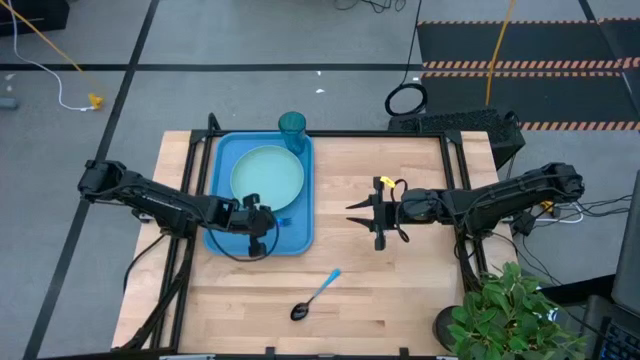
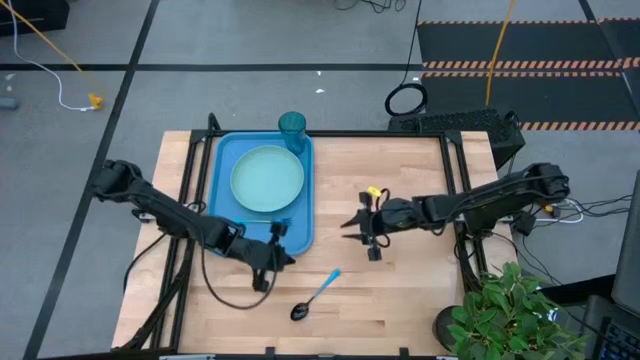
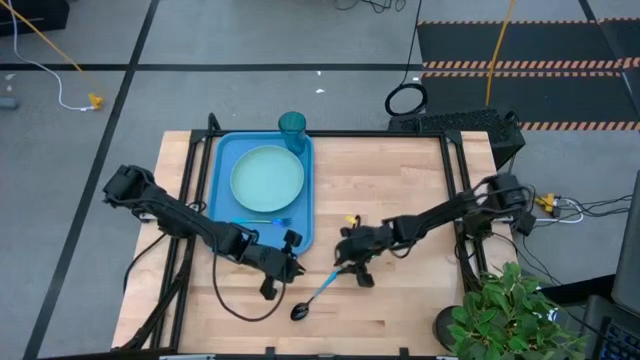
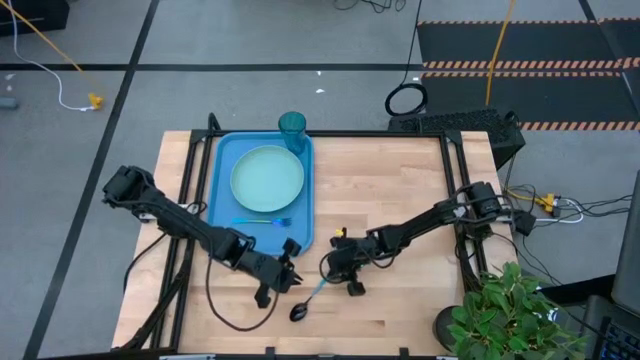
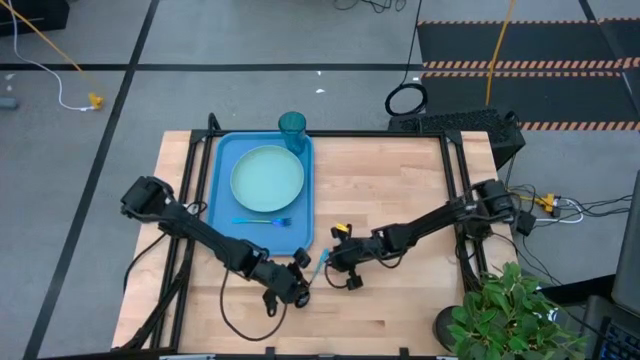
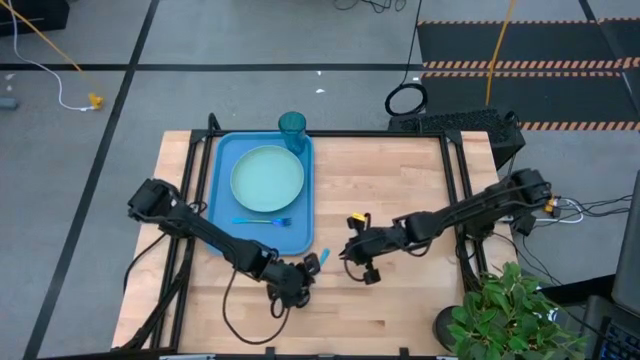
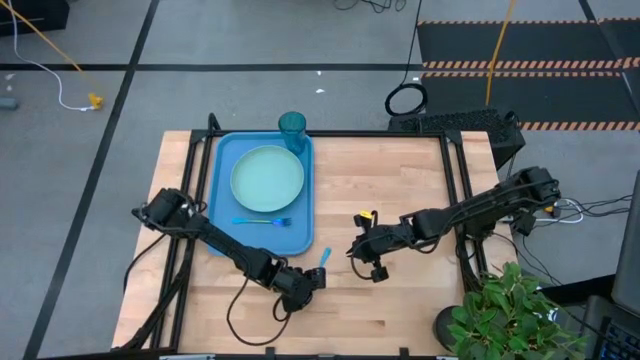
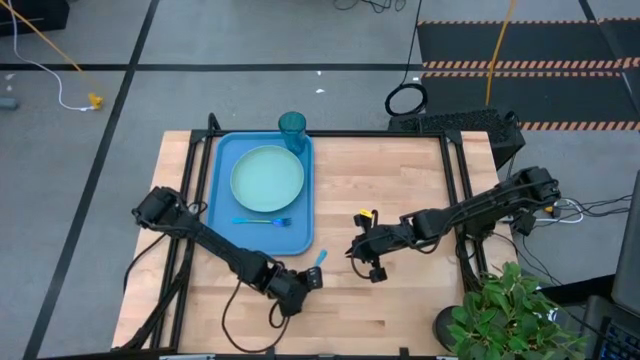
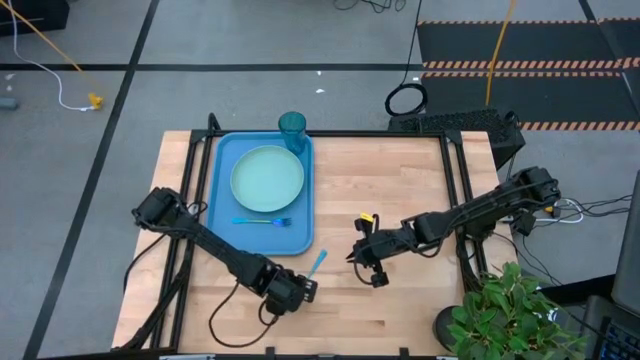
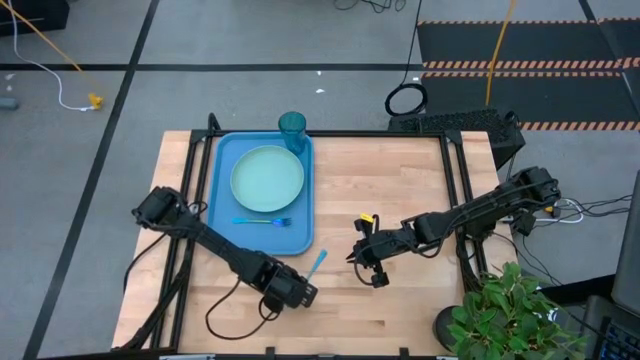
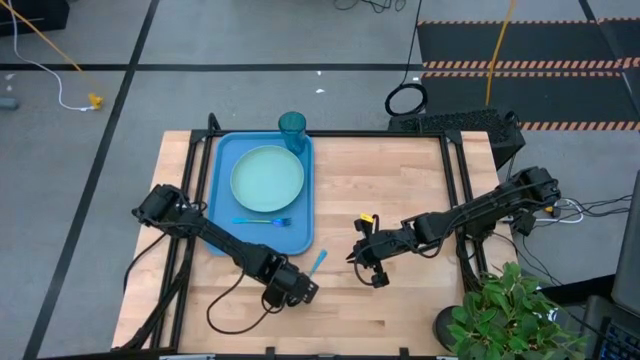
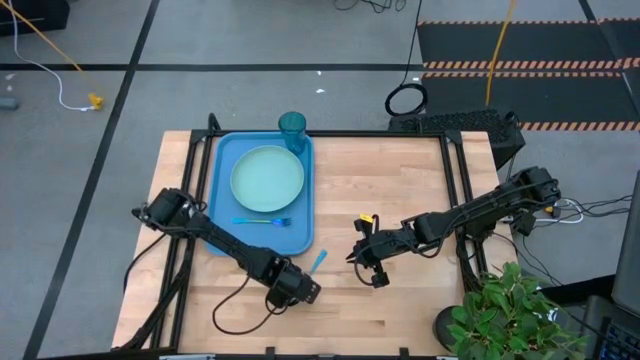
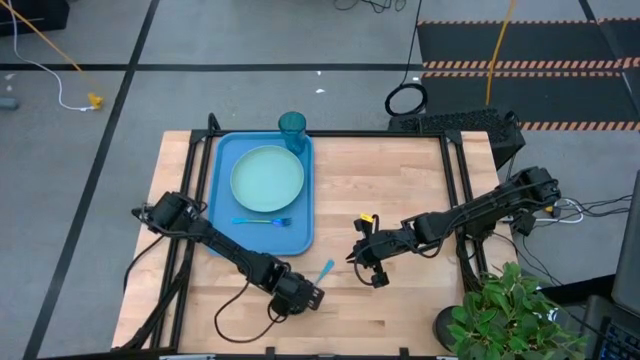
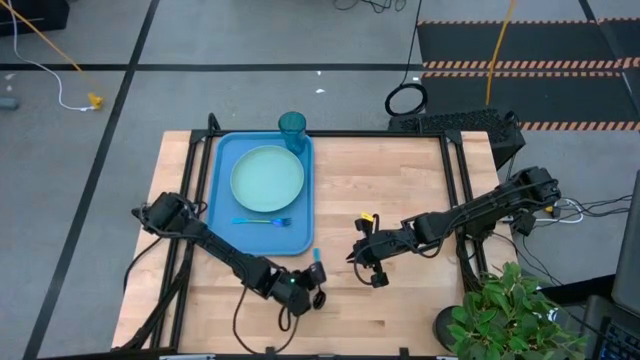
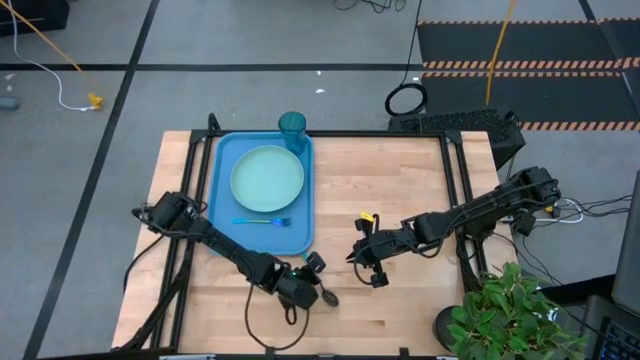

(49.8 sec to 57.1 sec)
Task: Pick and place plate/cup/fork/spoon on tray
Put the blue spoon on the blue tray to the bottom of the blue fork

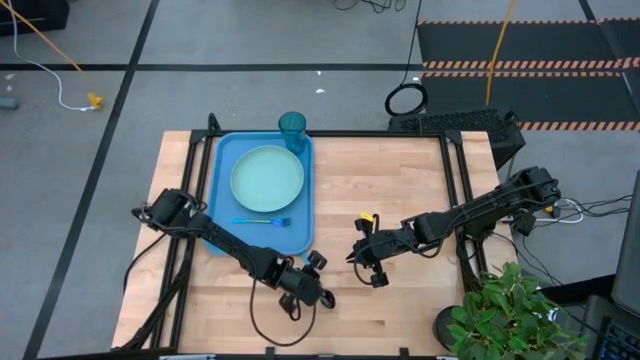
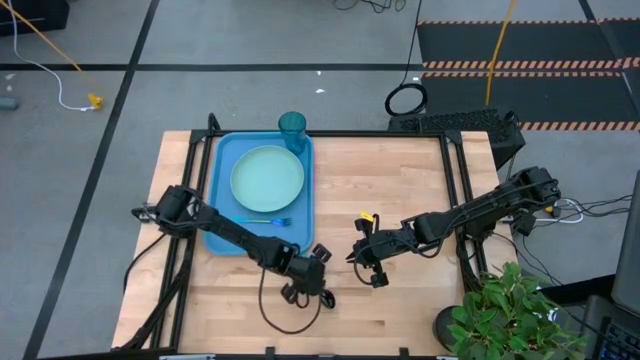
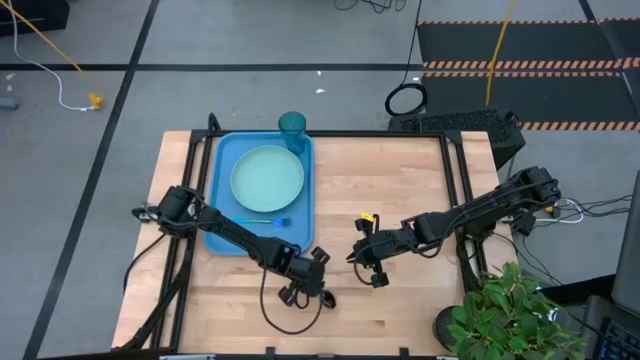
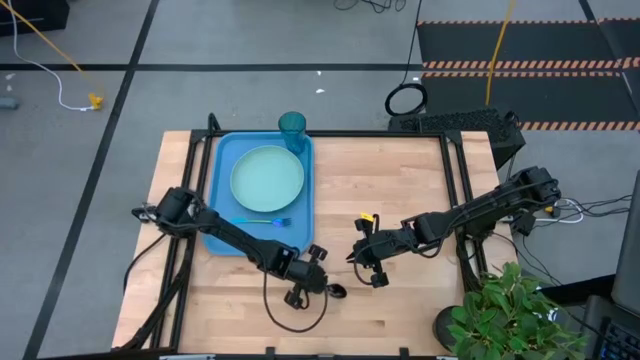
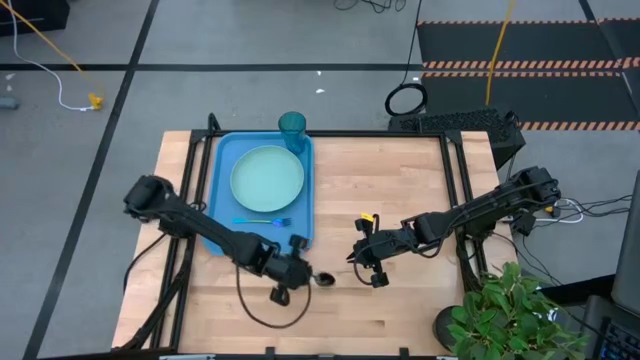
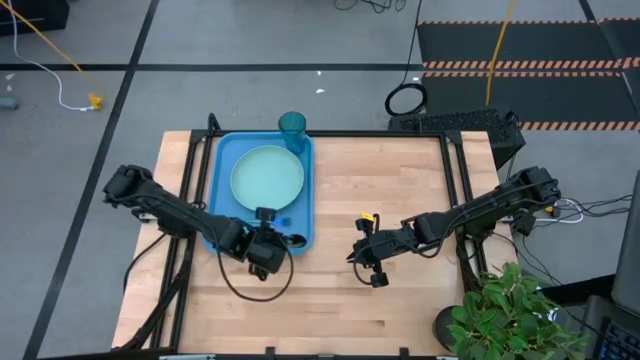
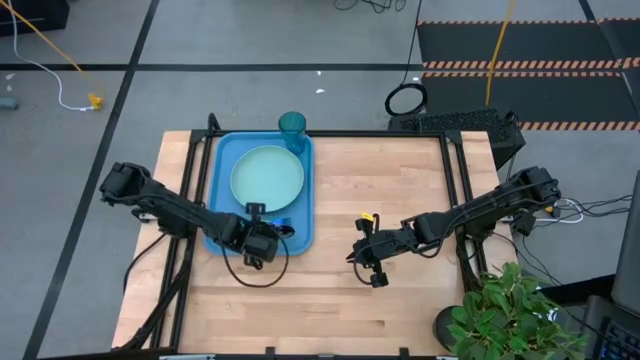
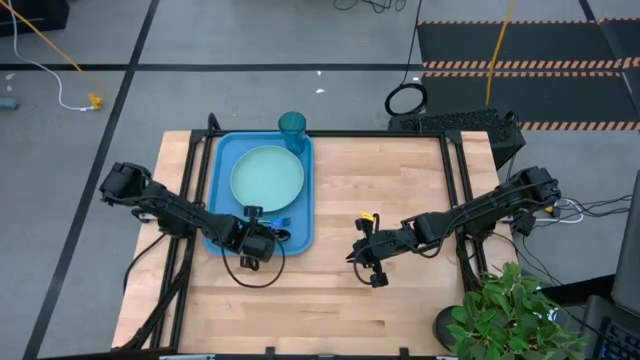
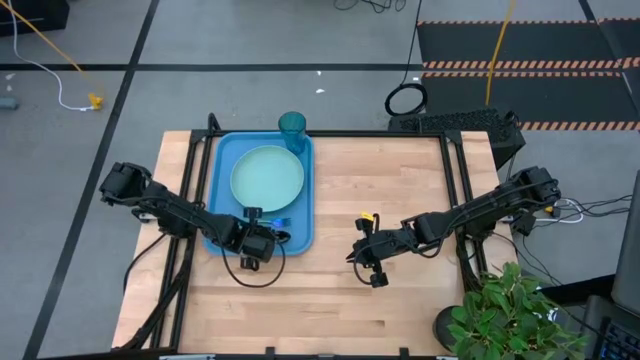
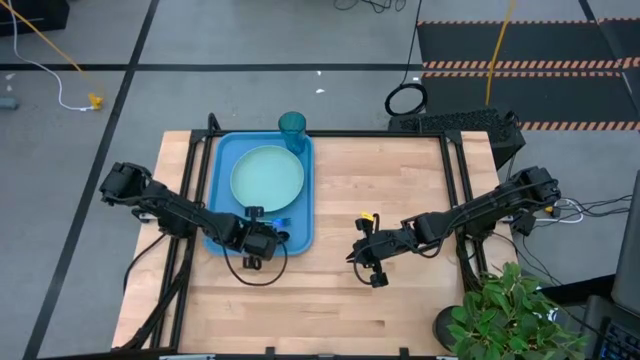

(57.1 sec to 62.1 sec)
Put the blue spoon on the blue tray to the bottom of the blue fork

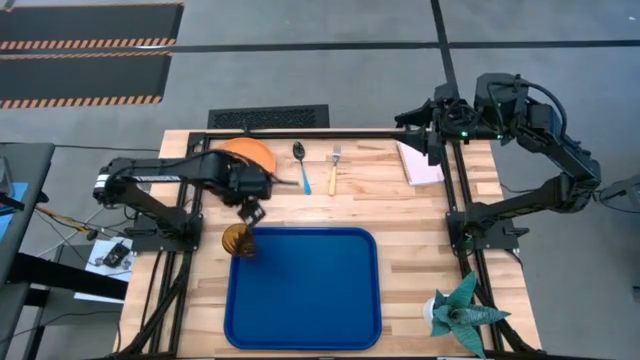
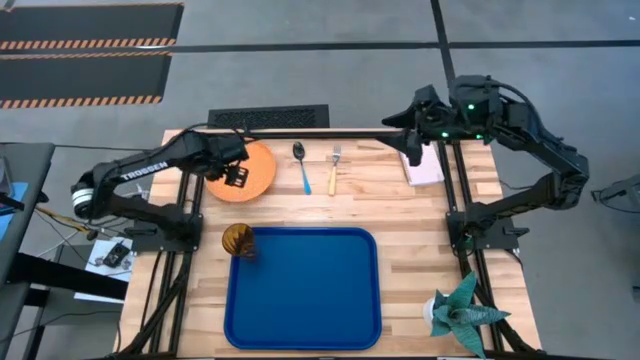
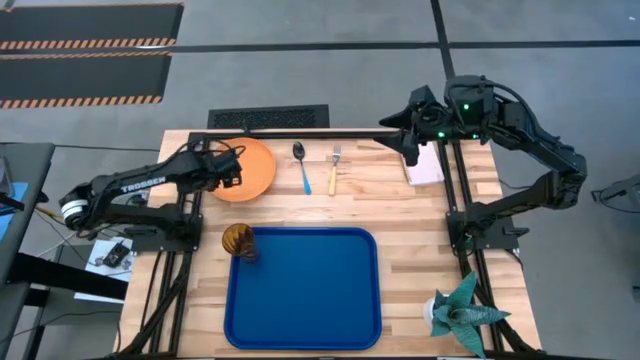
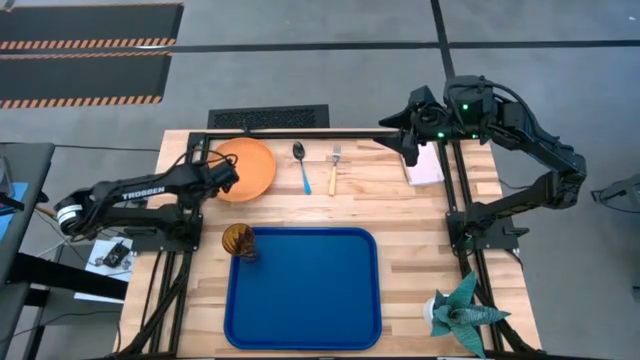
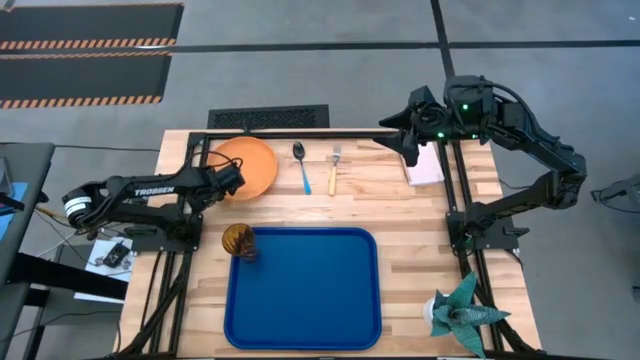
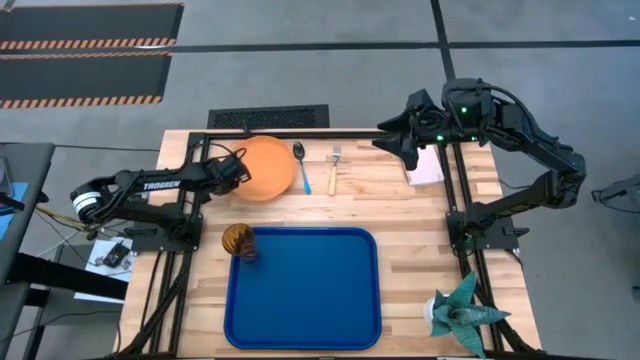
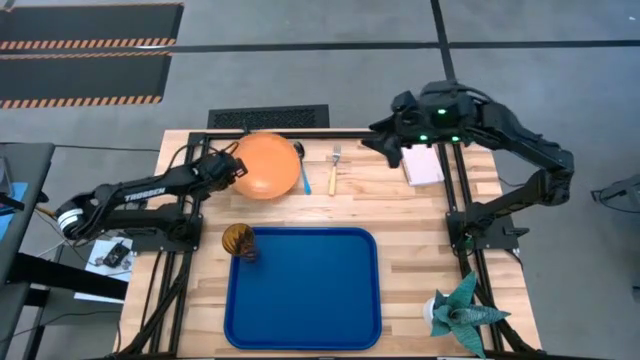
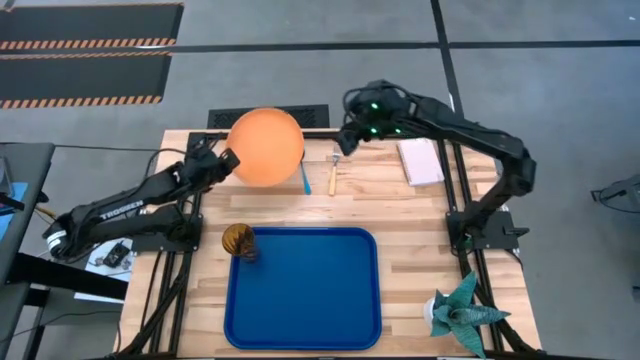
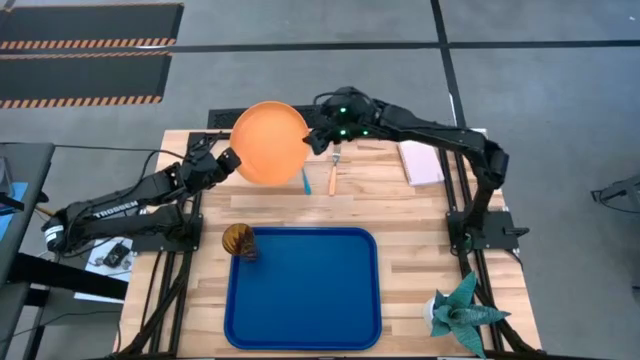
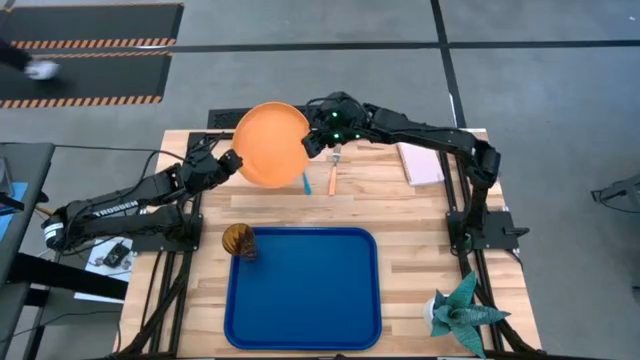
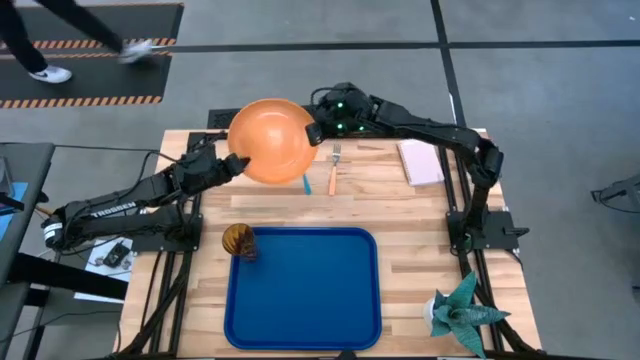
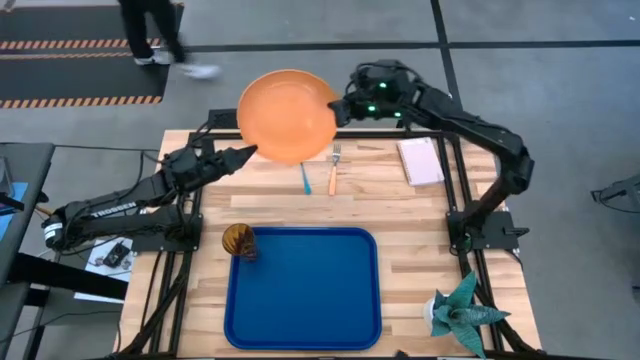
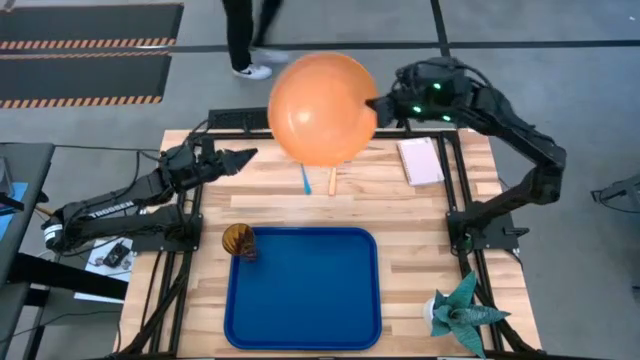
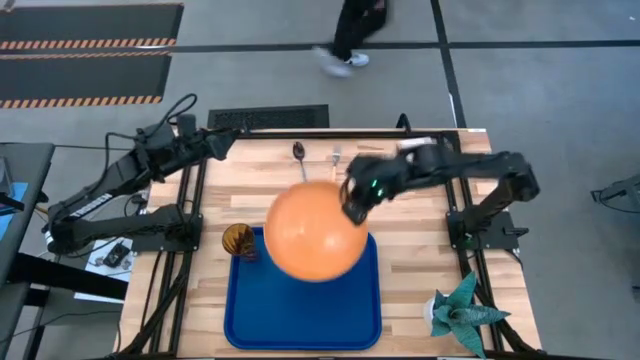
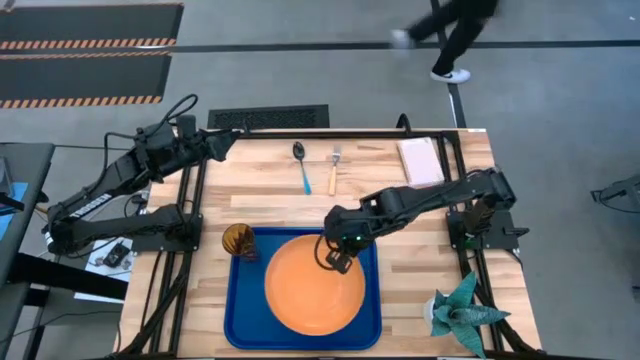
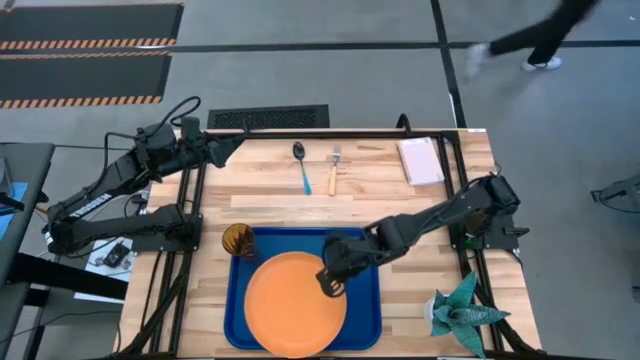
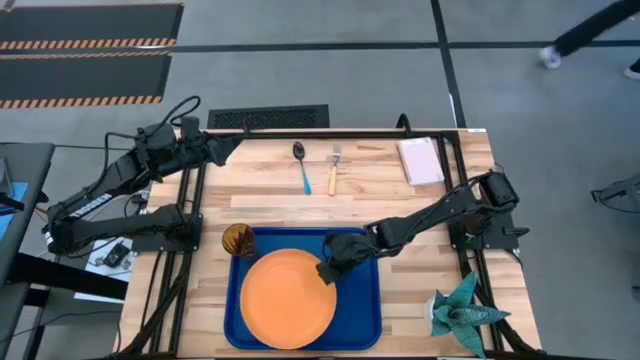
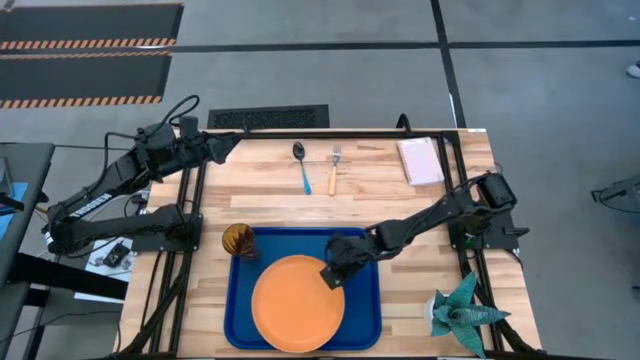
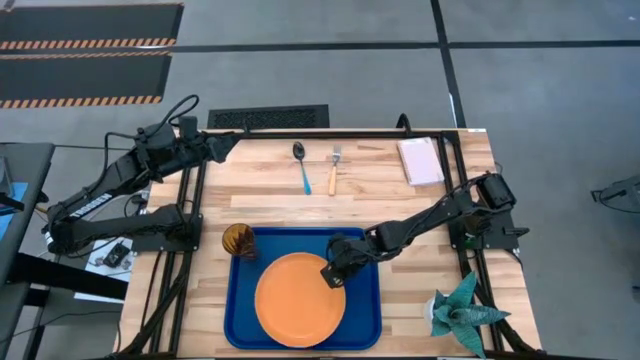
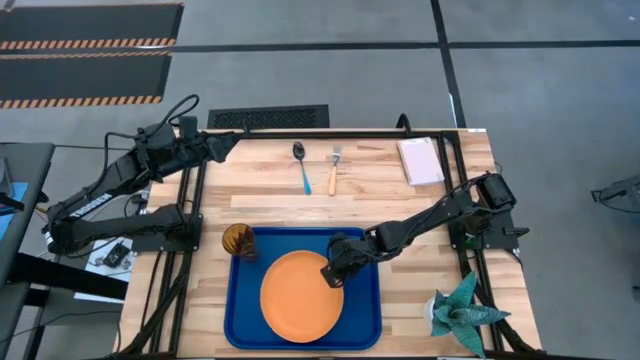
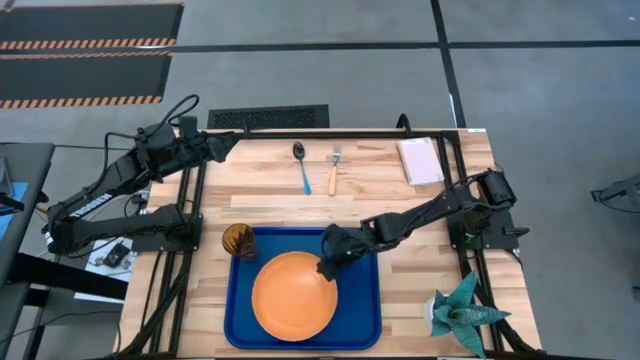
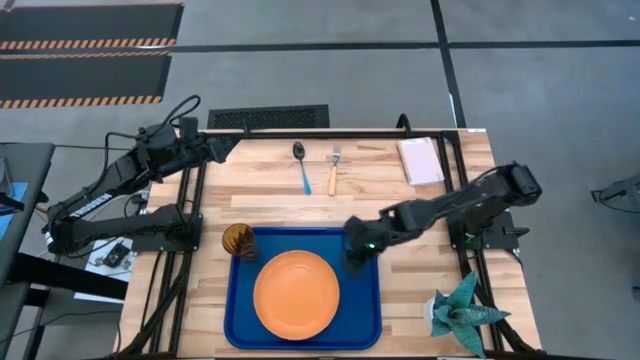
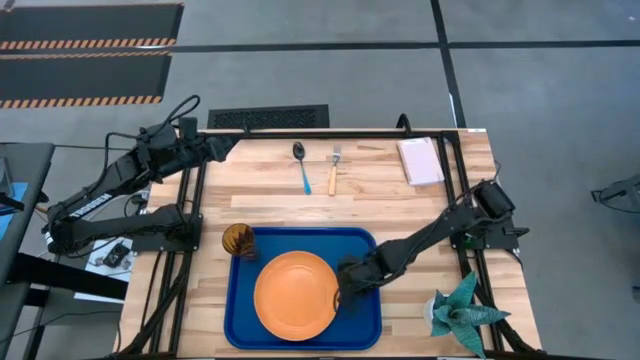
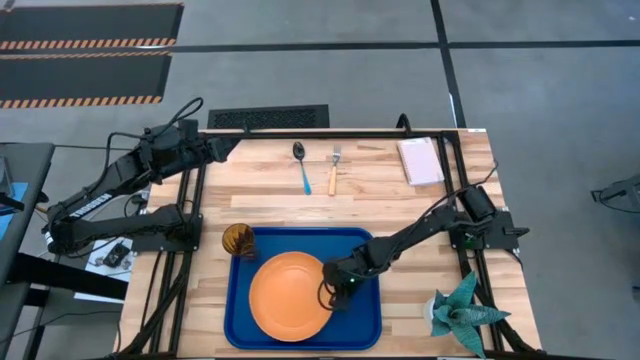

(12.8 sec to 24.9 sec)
Task: Pick and place plate/cup/fork/spoon on tray
Put the orange plate on the blue tray
